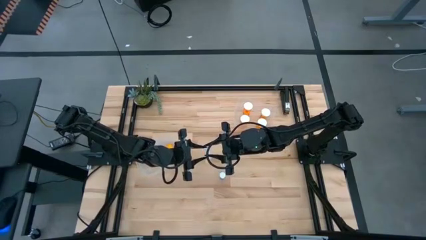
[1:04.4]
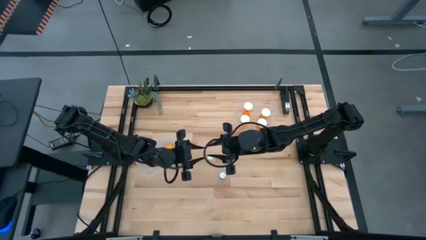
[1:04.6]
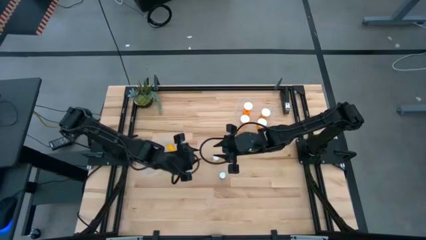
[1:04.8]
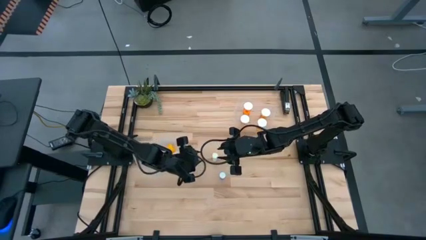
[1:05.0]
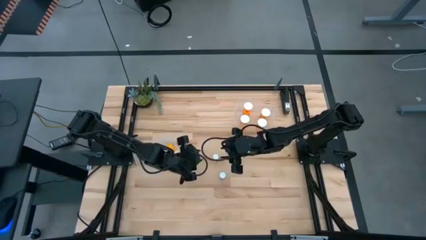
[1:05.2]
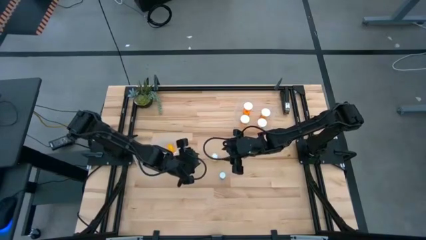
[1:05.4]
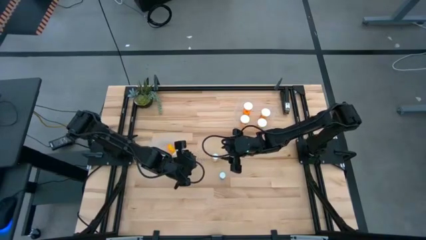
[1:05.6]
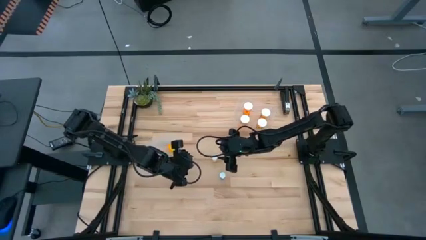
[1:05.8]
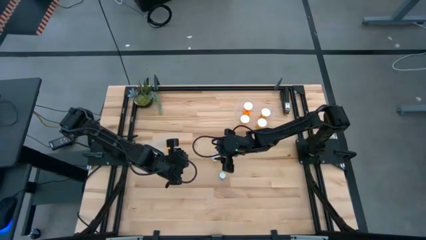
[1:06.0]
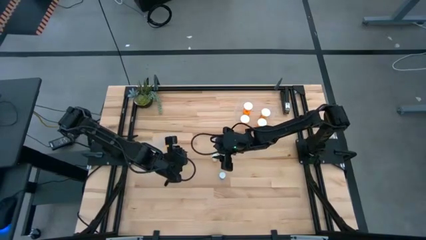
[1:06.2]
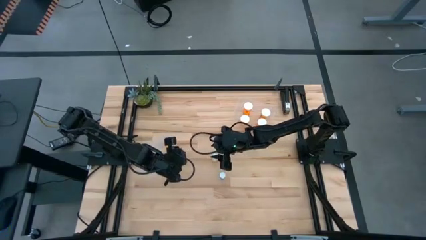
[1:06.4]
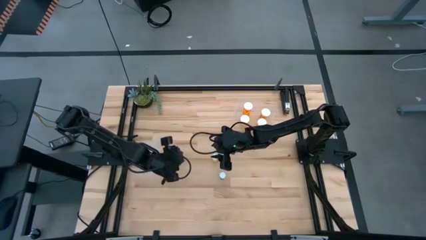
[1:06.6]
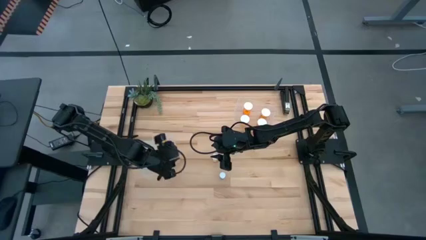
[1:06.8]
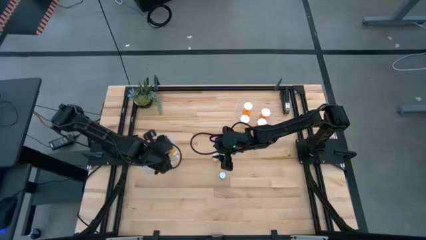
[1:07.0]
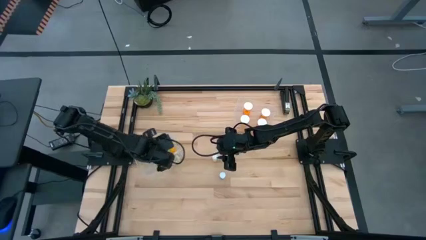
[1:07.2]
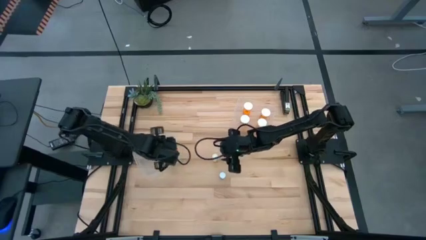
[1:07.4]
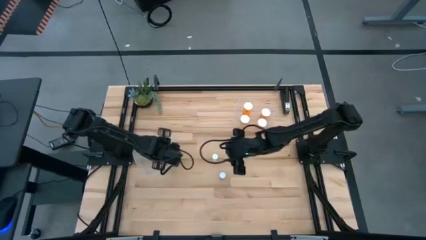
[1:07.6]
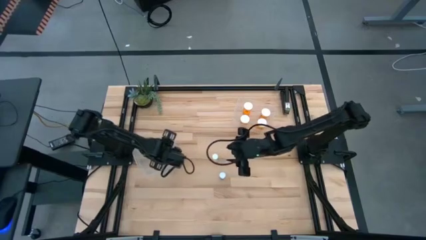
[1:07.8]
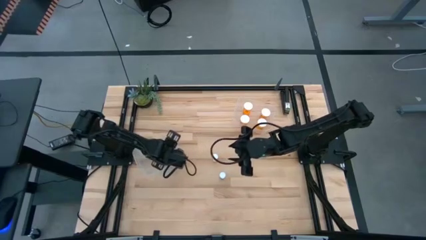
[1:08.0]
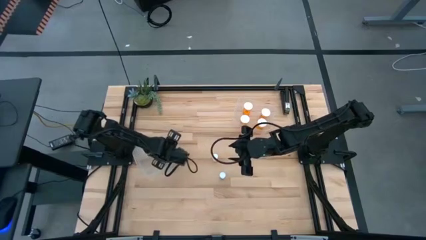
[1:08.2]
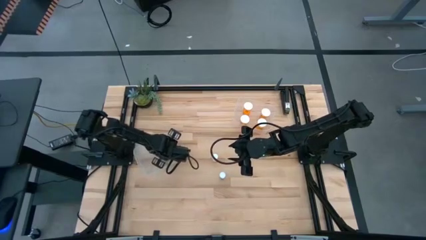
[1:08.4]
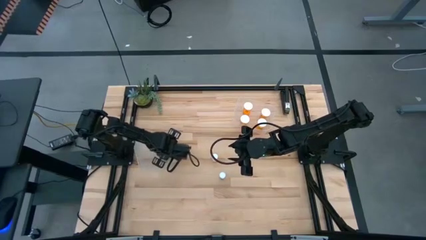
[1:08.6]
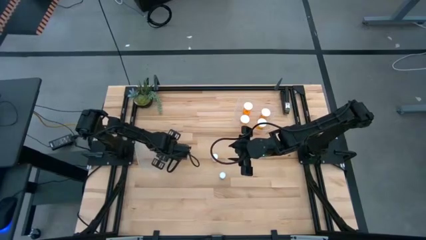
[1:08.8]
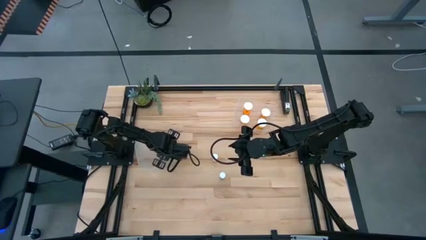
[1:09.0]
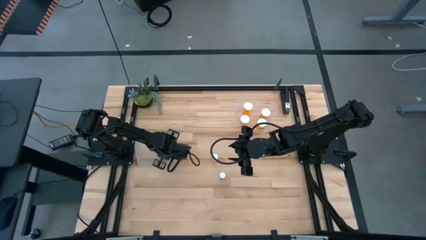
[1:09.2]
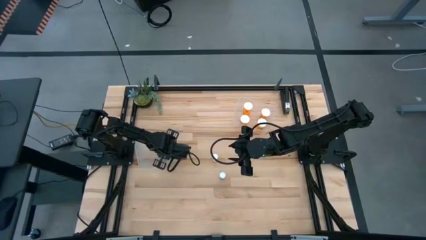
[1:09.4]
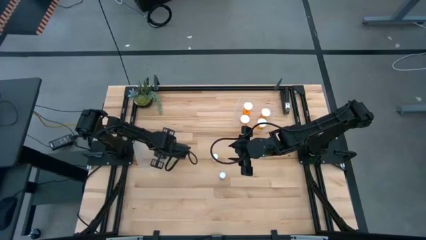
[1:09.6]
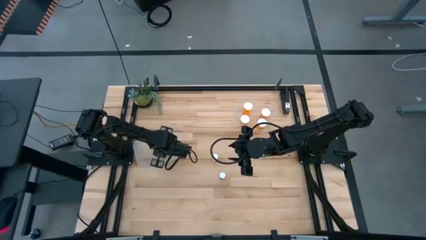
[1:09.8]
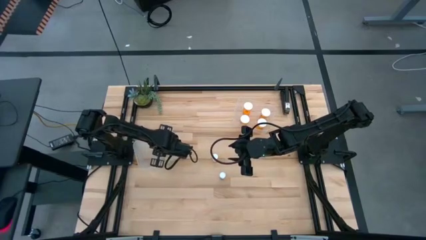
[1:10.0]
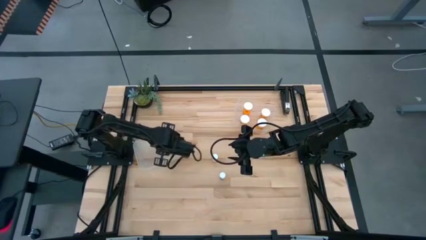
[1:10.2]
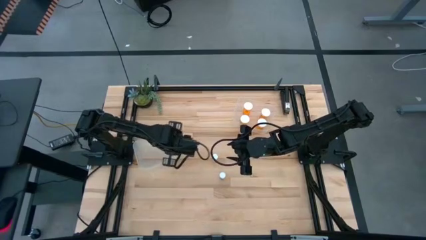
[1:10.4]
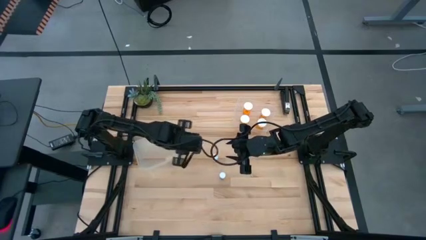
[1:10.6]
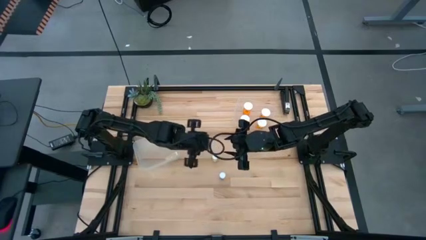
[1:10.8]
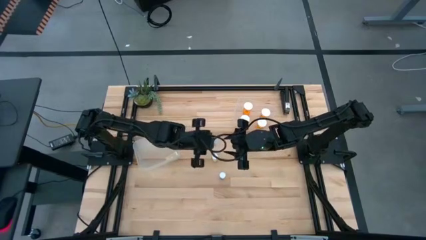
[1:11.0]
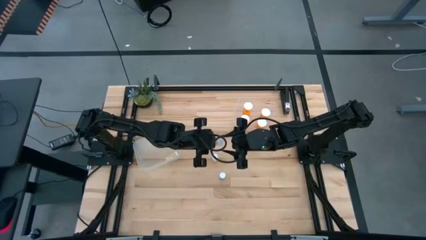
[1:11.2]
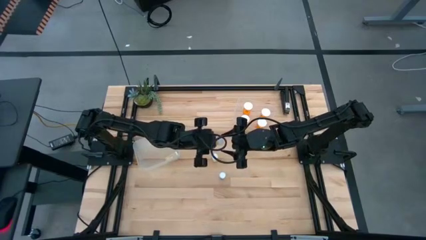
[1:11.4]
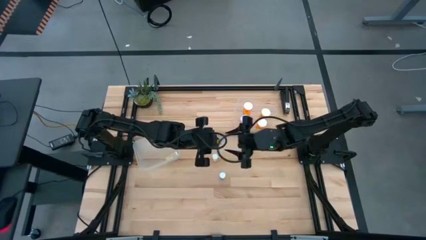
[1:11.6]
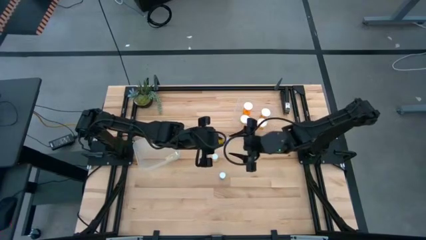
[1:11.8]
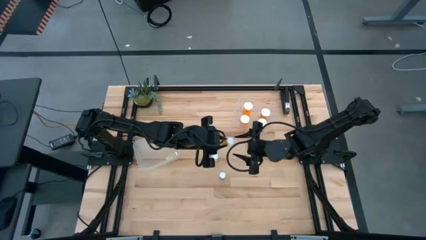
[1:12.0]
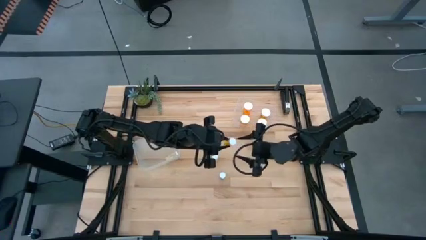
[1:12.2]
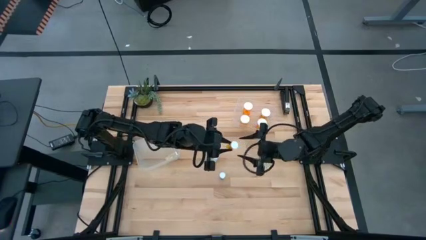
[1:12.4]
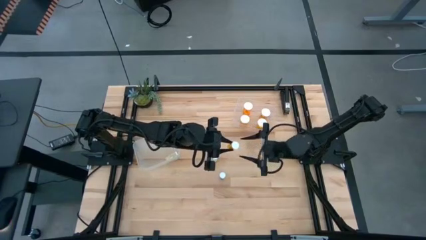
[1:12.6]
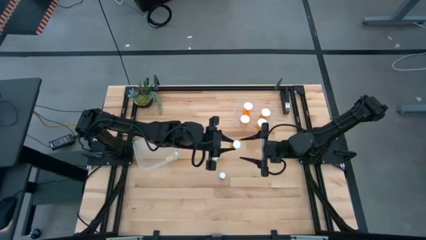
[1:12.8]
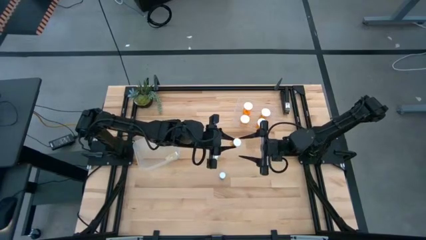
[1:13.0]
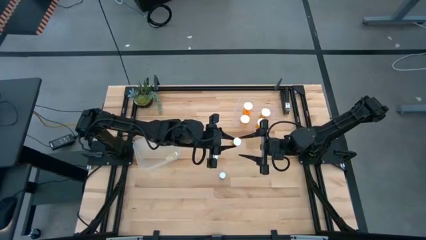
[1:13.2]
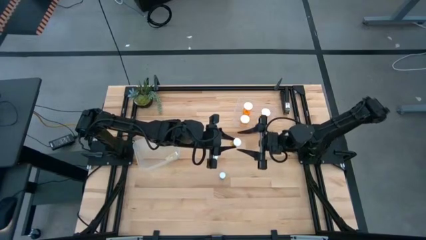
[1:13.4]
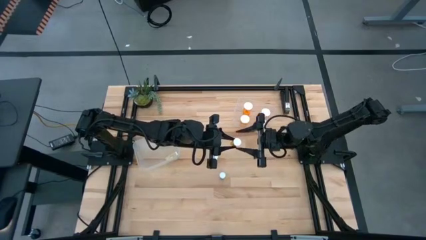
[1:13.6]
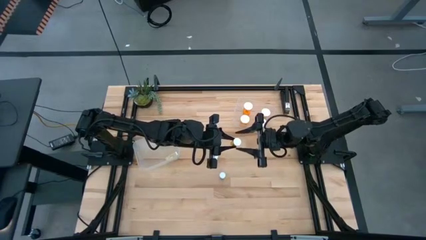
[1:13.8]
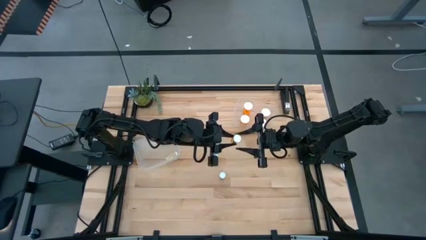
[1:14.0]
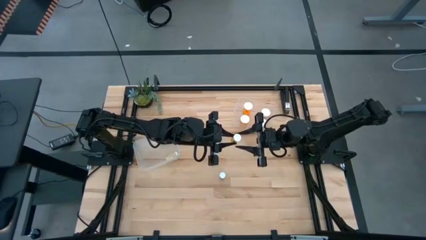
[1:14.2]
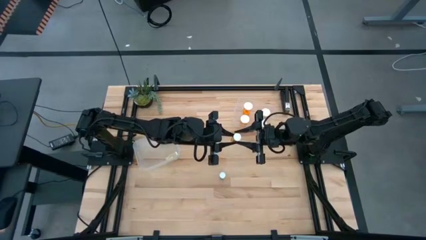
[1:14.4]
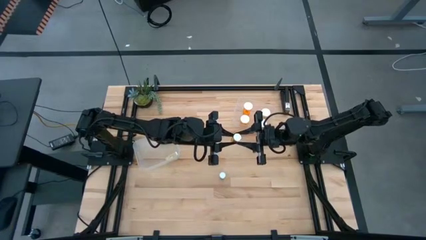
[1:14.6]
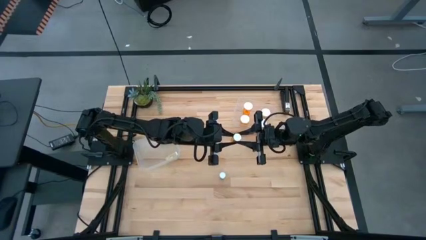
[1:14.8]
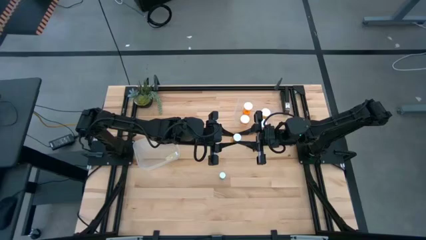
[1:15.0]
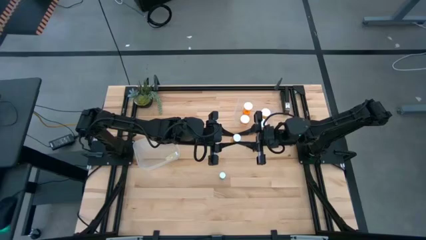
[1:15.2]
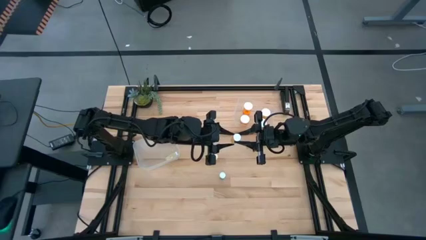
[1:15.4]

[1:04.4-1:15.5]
Task: Pick and place medicine bottles into bin by pill shape (circle, oval)
Adjust the small orange pill bottle in the left transparent bin

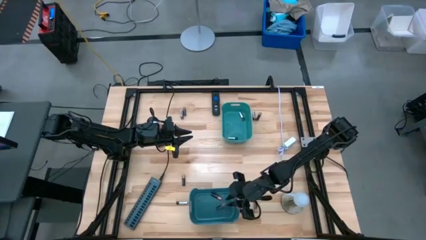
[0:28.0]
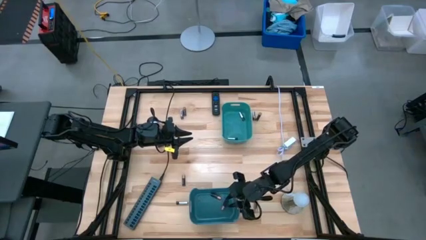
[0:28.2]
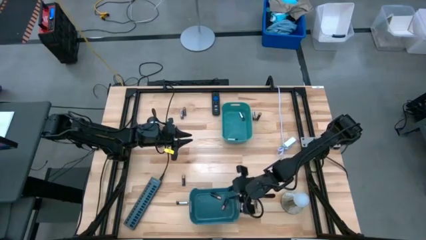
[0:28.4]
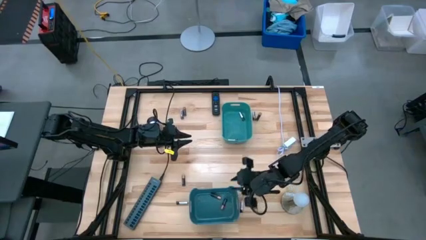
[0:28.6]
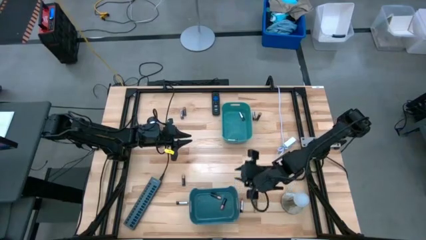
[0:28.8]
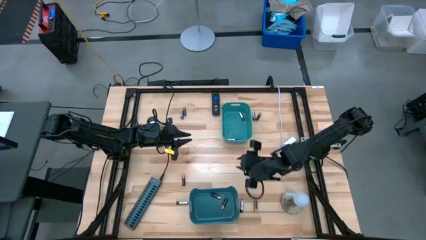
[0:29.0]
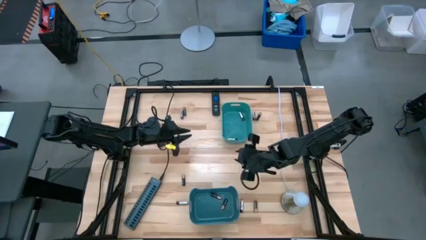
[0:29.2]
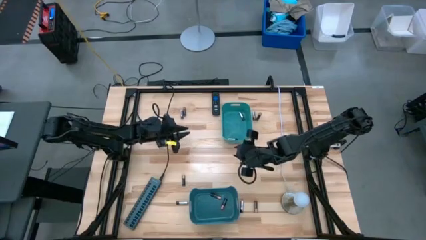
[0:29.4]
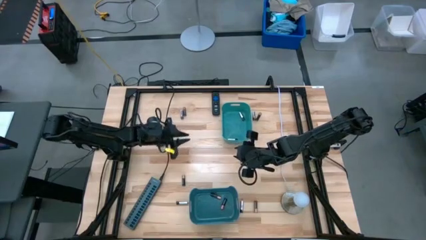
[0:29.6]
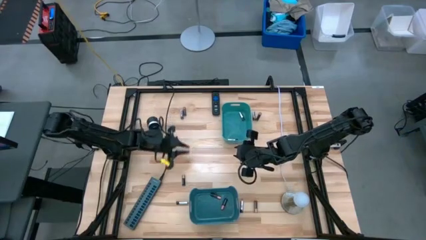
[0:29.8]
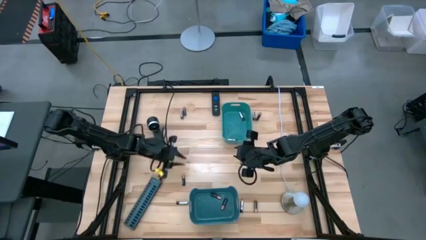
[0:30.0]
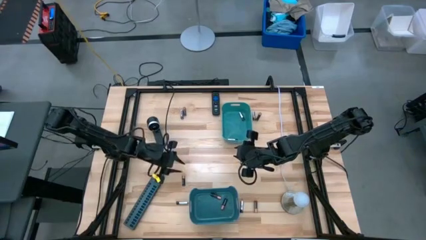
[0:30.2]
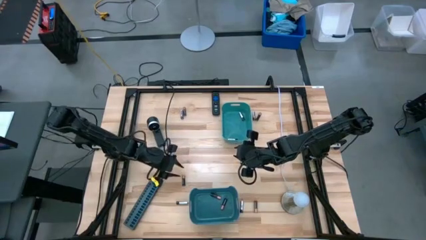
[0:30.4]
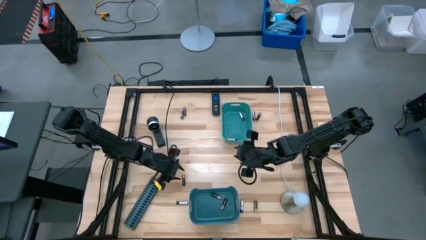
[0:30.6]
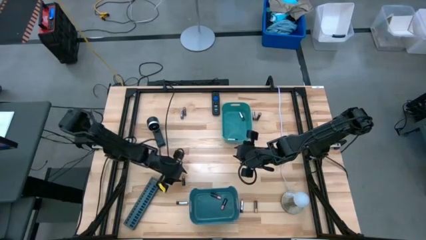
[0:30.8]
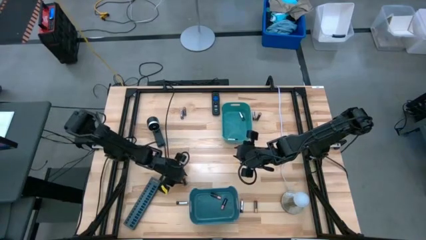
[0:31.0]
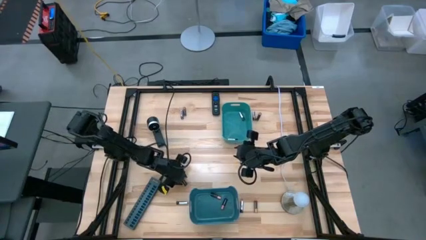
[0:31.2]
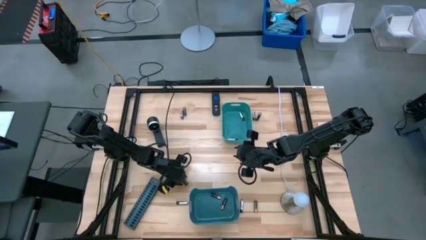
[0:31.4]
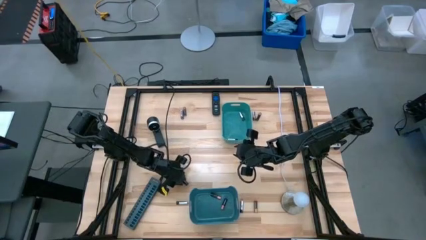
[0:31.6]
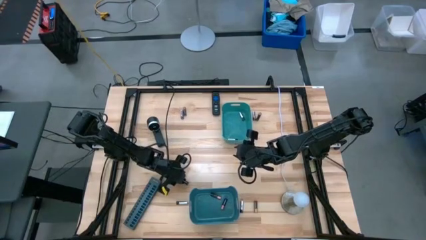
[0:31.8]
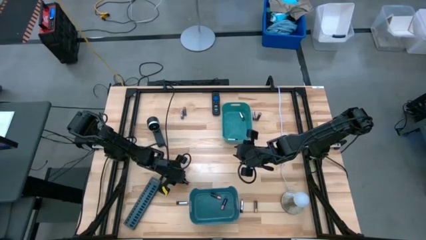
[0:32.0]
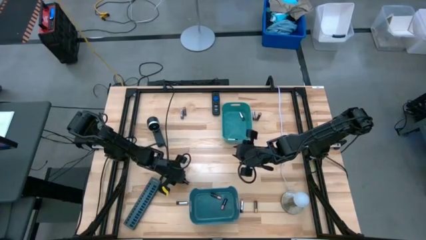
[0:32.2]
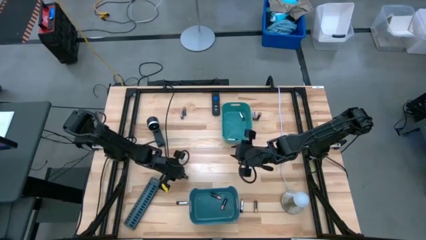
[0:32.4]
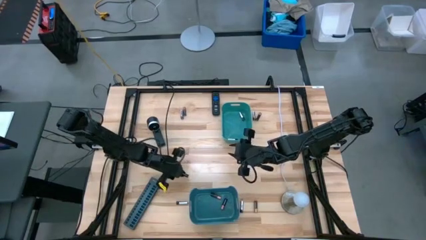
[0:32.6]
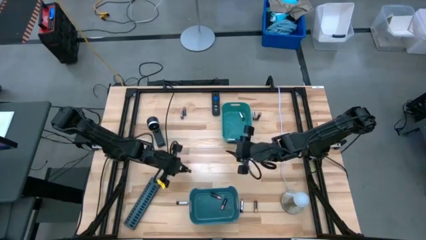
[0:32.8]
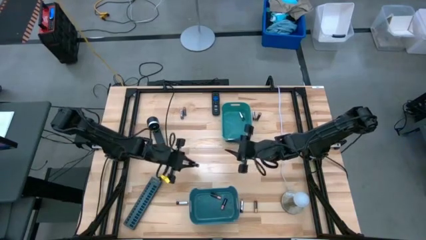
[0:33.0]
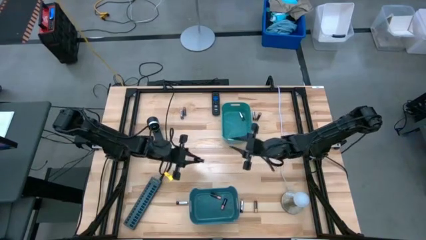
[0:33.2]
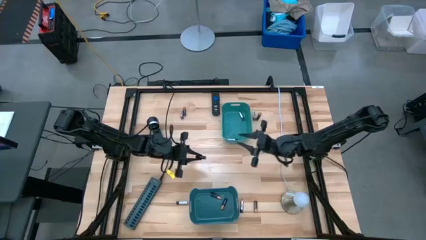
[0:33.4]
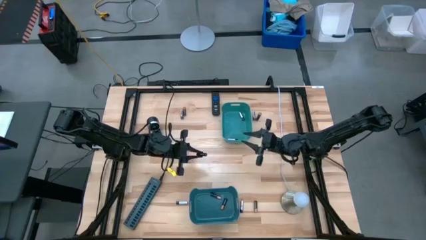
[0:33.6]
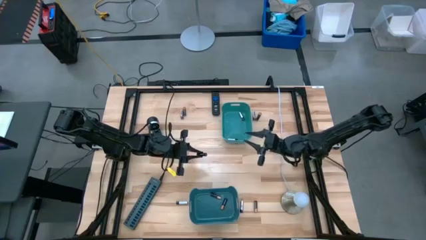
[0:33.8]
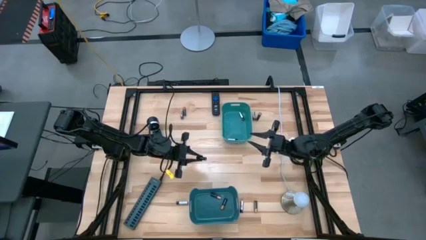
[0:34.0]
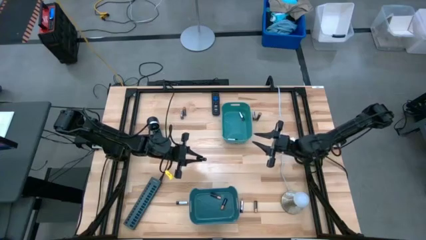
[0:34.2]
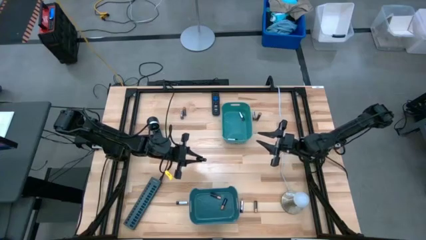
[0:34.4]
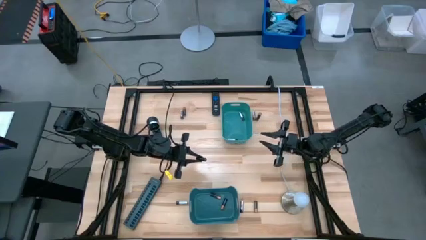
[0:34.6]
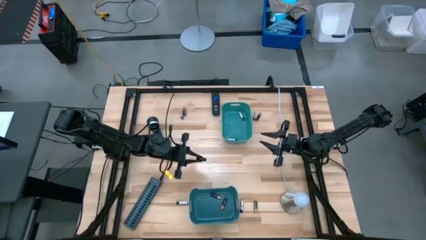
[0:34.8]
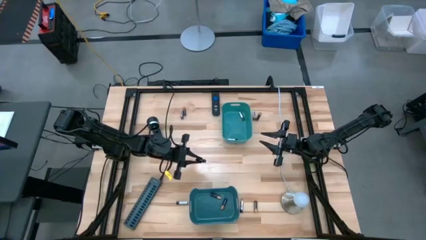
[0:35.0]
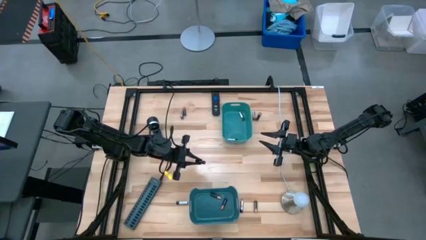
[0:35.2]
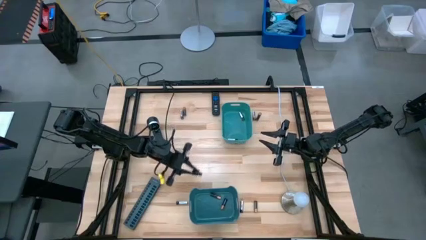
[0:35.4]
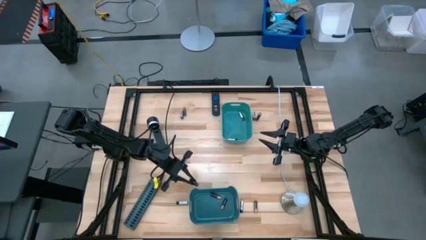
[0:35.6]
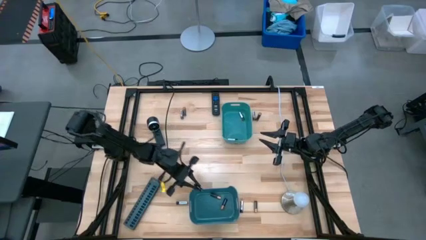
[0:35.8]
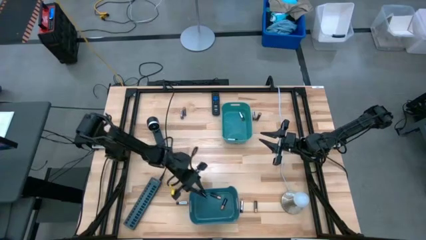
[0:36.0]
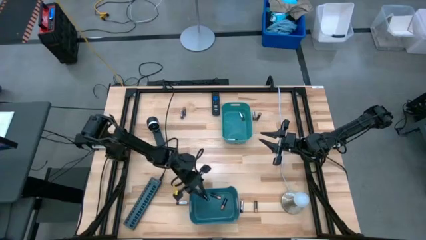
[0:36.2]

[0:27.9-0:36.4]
Task: Sort batteries
Put the black battery into the blue bin
